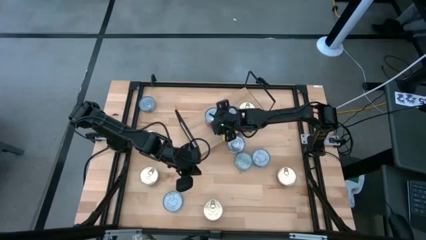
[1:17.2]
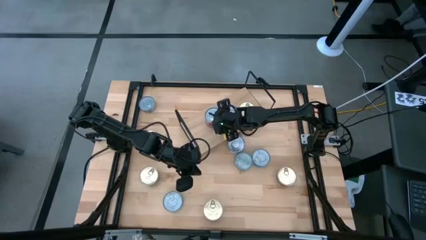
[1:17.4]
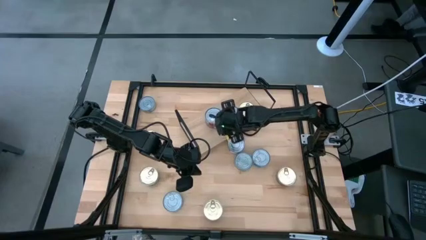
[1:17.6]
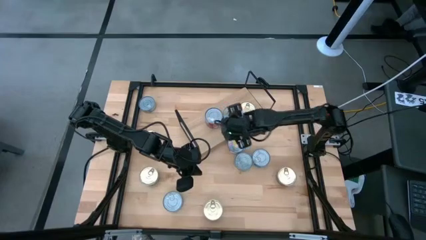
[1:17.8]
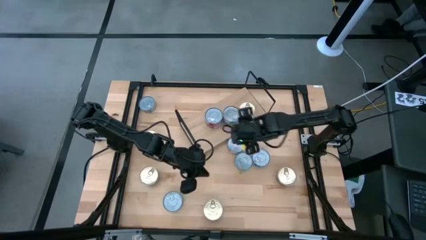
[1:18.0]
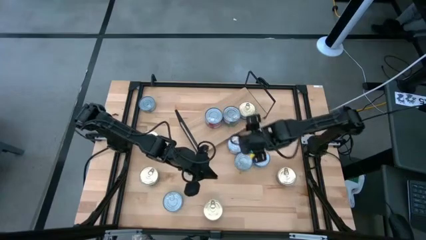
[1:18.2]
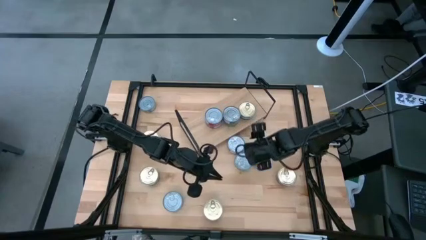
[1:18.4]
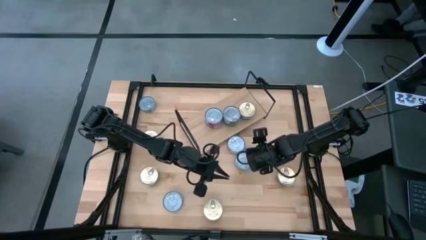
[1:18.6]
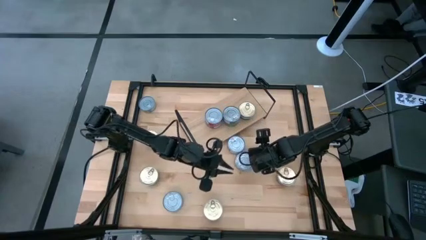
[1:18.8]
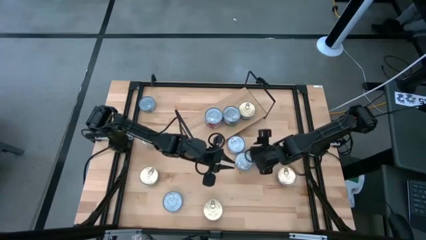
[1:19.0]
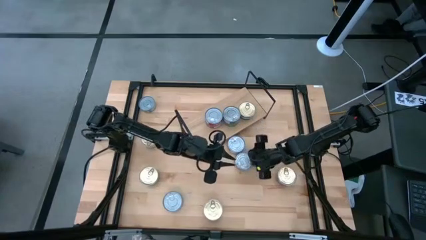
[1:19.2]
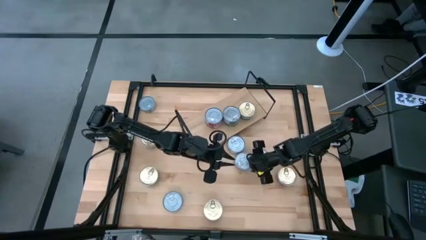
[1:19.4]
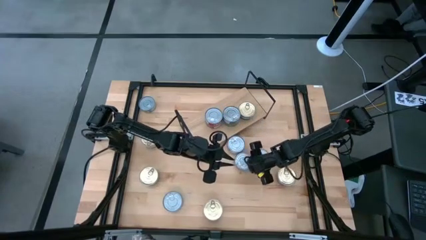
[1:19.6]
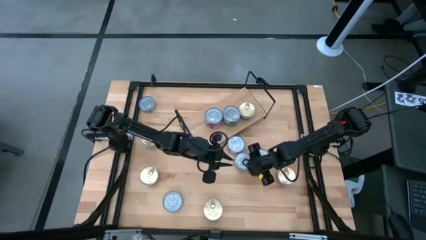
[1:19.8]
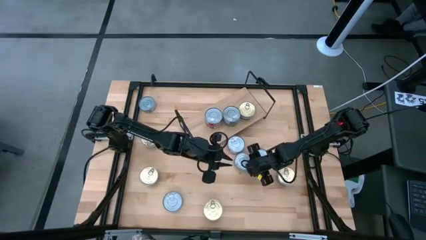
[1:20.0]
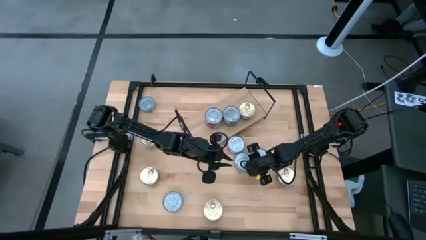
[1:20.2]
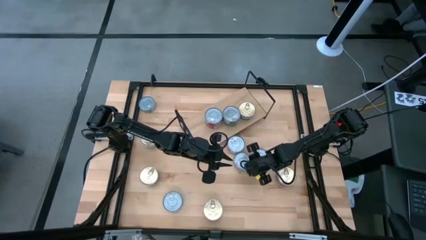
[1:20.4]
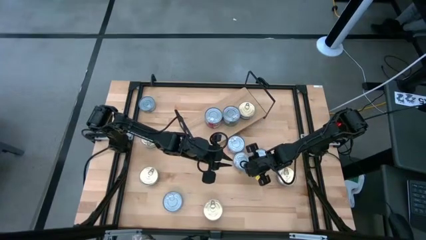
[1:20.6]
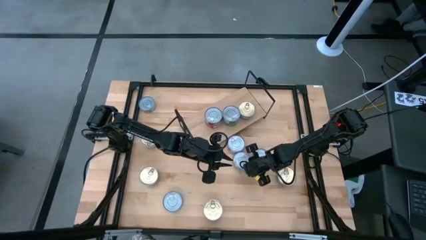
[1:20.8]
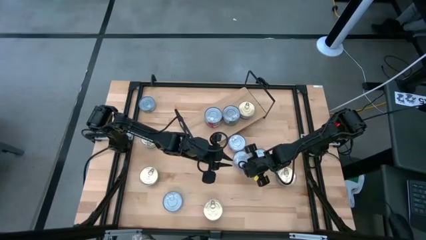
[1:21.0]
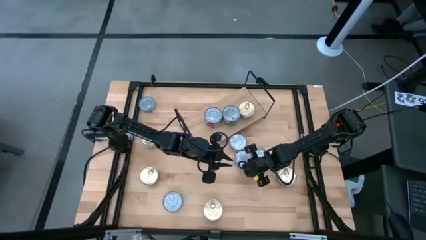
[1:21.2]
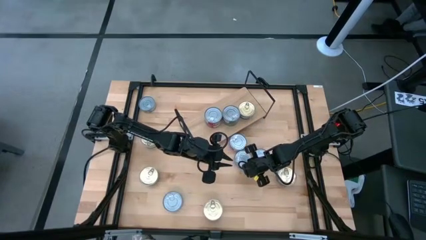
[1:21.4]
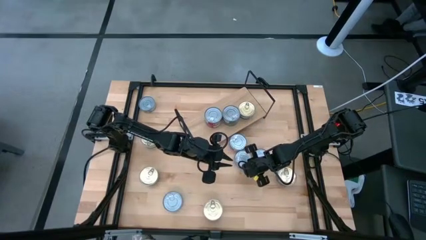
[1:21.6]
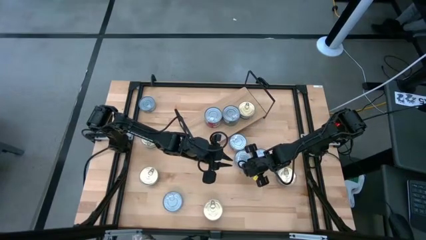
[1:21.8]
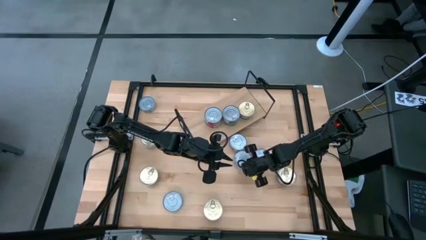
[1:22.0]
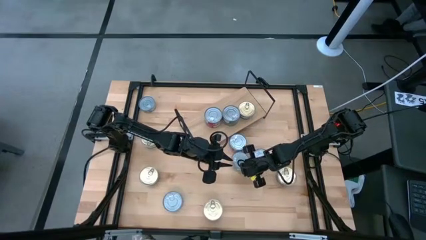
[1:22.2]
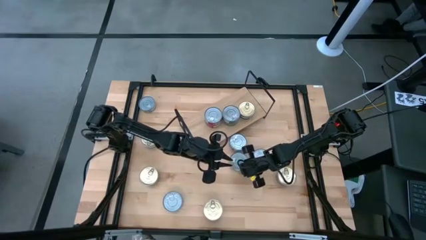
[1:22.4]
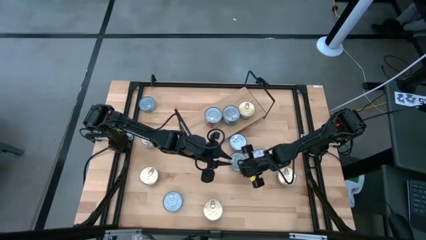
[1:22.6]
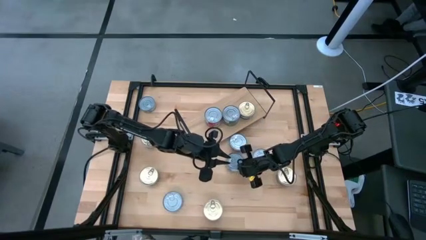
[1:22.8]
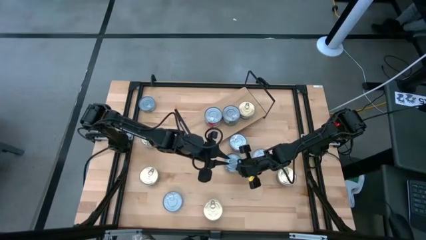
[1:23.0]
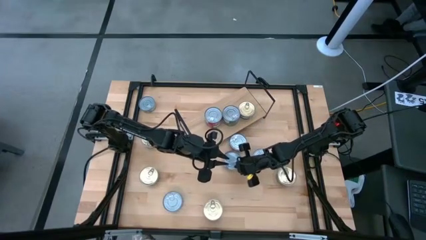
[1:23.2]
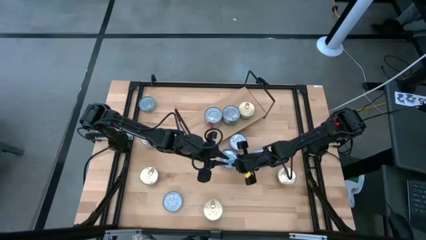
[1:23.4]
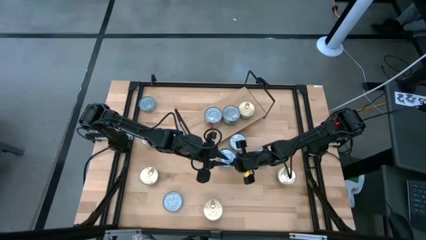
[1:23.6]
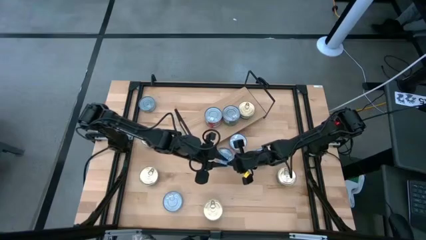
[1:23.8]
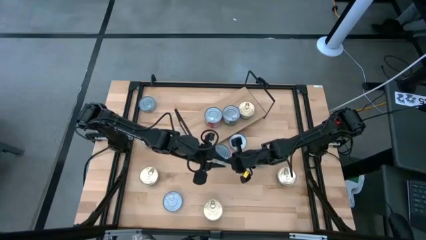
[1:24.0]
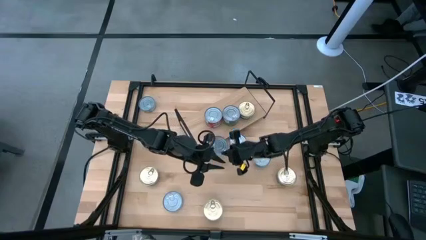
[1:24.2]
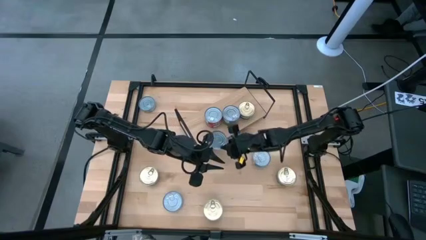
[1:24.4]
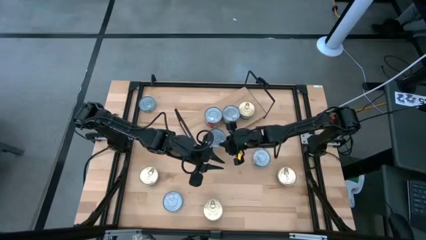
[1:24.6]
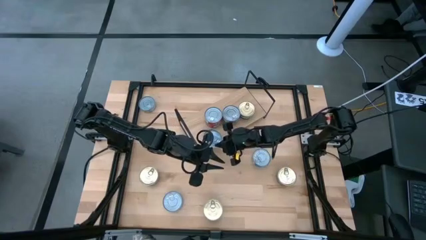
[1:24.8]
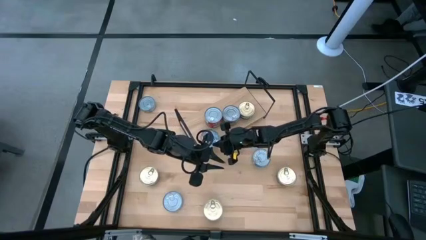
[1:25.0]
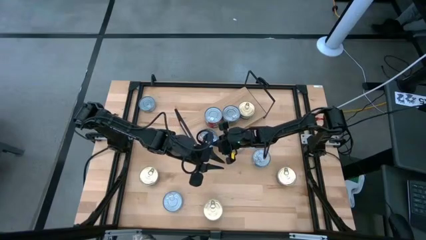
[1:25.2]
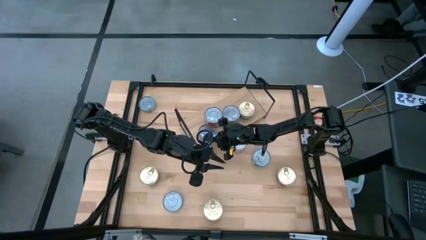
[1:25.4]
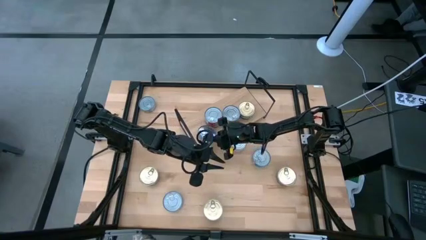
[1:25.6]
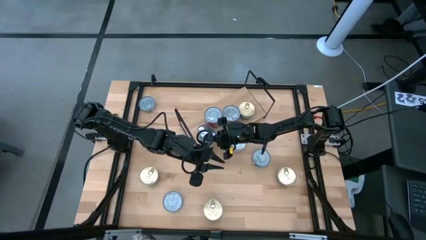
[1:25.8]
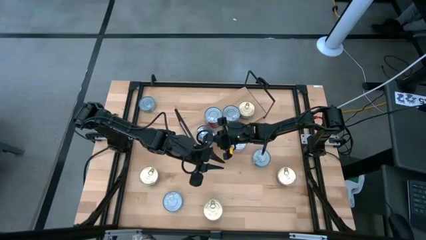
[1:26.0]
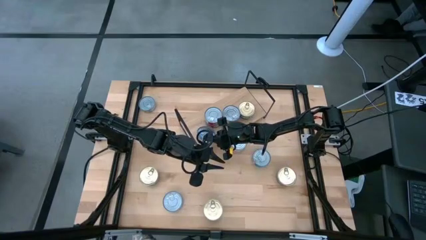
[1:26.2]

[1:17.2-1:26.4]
Task: Stack canned seafood by type on shelf
Put the yellow and blue tuna can on the shelf

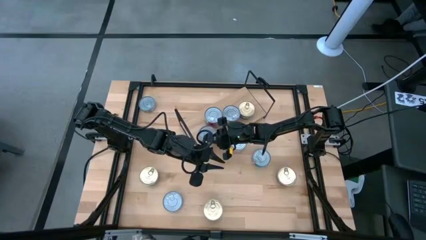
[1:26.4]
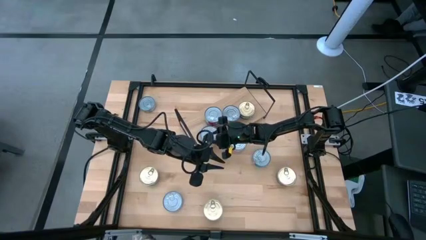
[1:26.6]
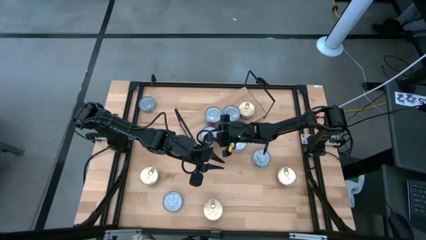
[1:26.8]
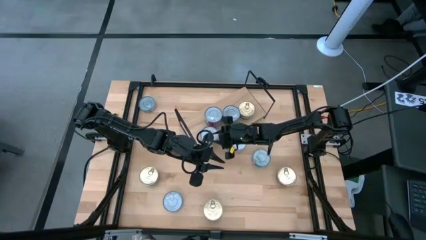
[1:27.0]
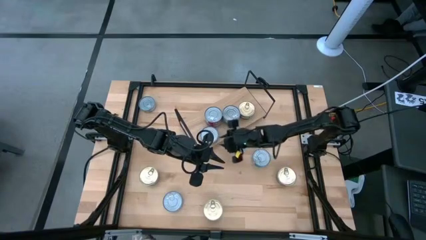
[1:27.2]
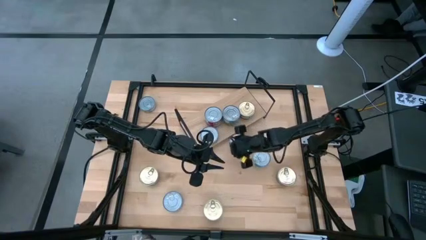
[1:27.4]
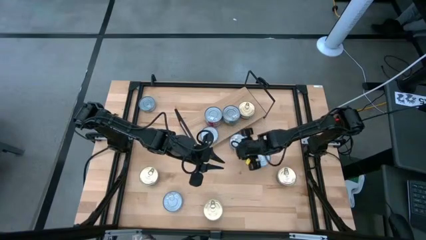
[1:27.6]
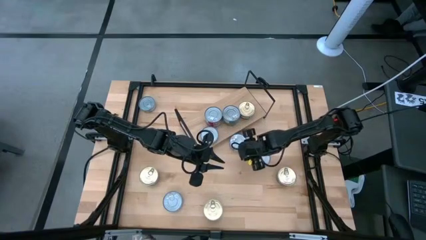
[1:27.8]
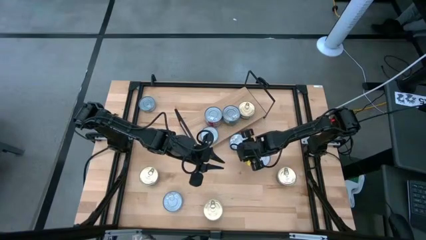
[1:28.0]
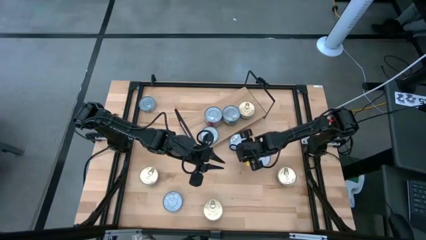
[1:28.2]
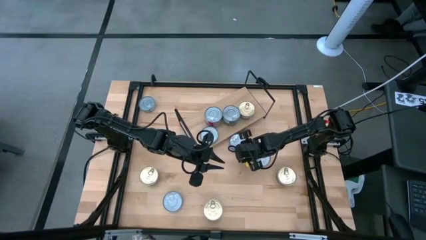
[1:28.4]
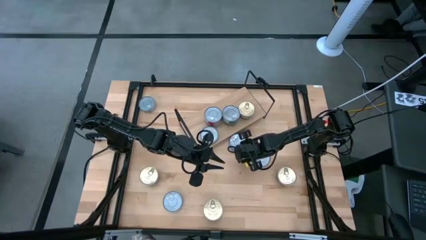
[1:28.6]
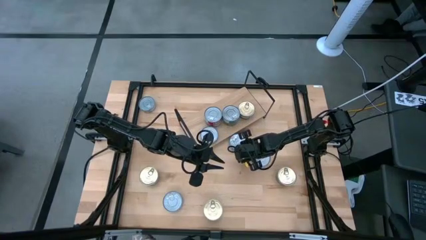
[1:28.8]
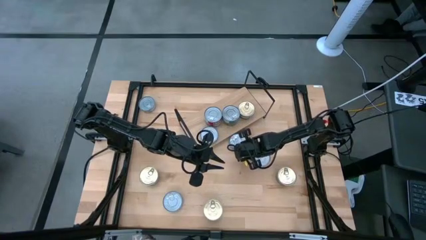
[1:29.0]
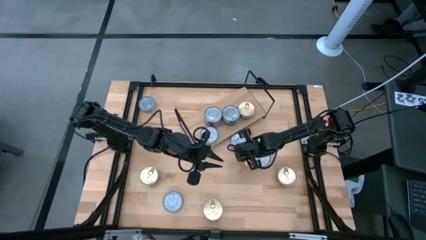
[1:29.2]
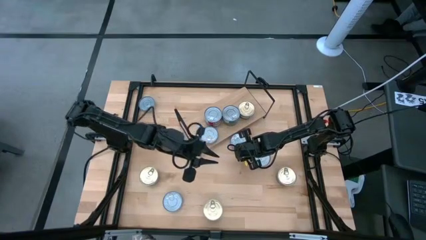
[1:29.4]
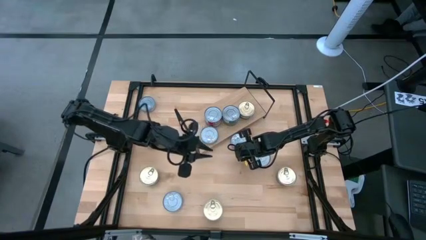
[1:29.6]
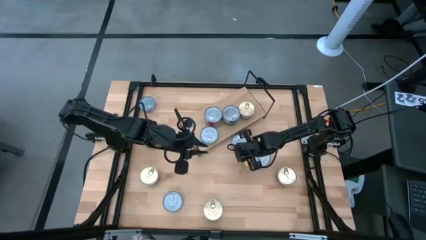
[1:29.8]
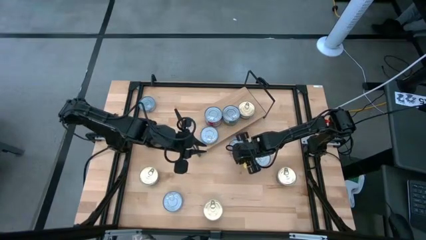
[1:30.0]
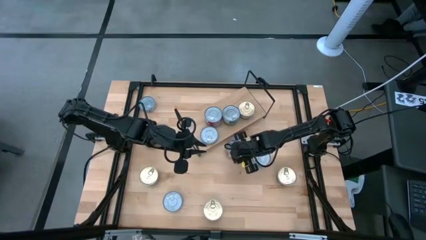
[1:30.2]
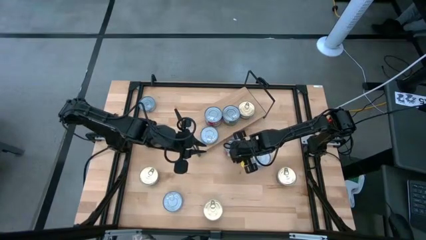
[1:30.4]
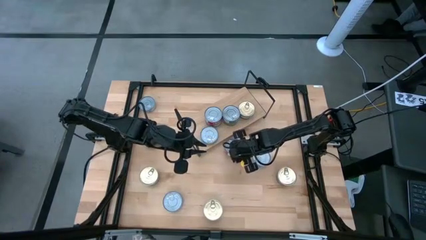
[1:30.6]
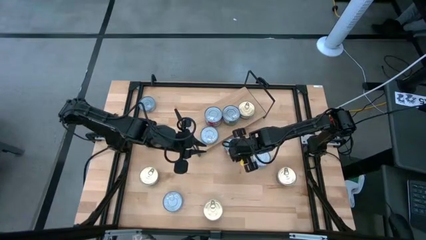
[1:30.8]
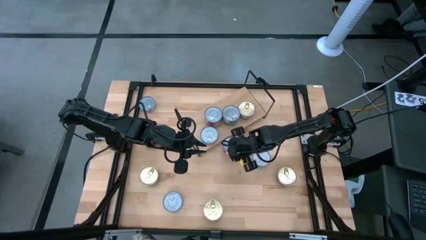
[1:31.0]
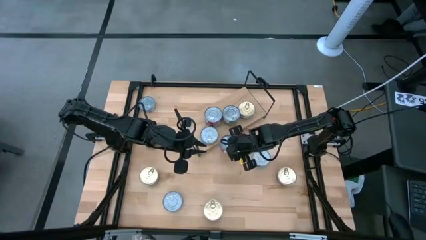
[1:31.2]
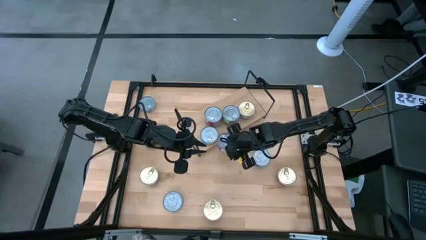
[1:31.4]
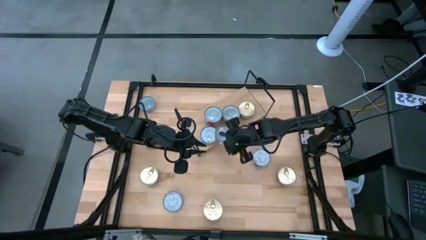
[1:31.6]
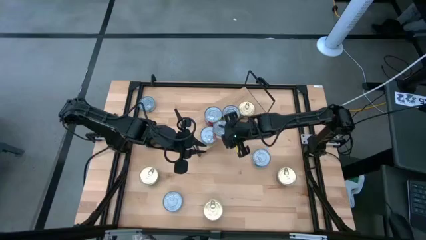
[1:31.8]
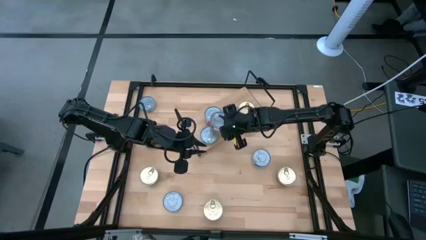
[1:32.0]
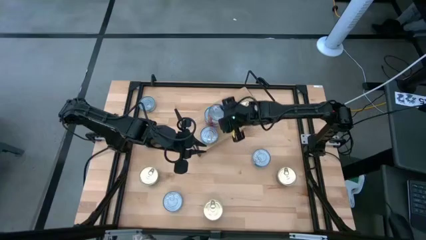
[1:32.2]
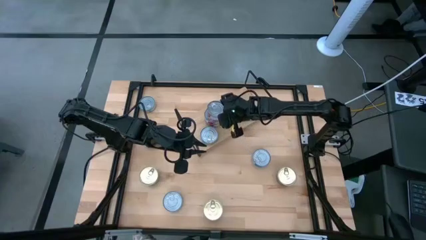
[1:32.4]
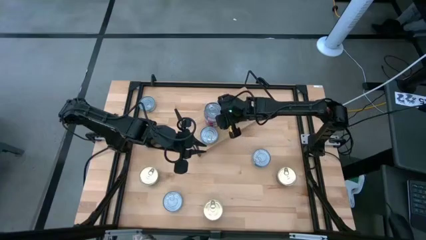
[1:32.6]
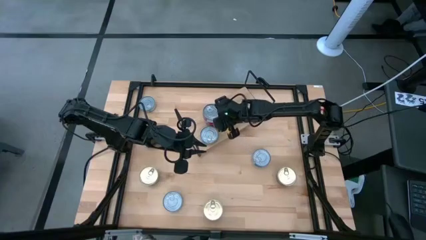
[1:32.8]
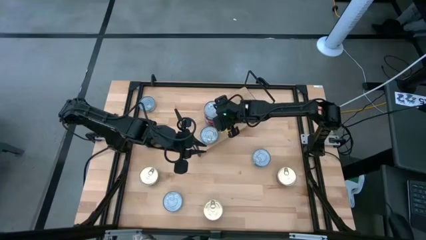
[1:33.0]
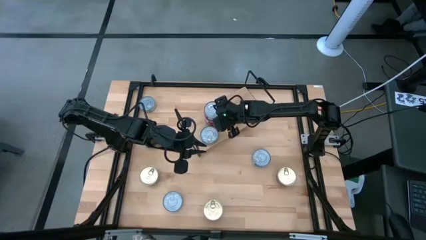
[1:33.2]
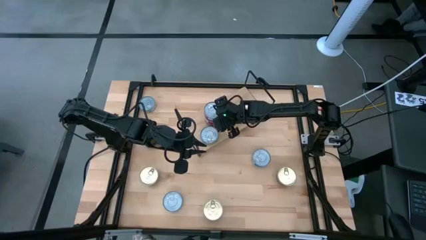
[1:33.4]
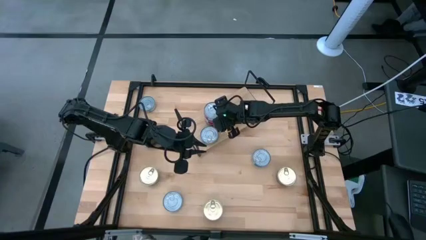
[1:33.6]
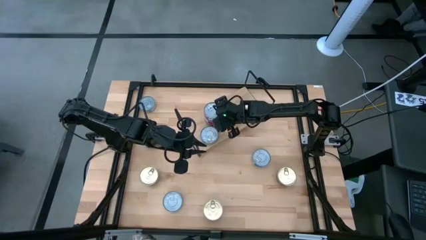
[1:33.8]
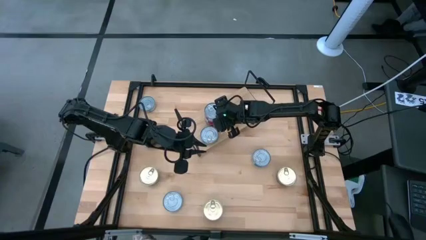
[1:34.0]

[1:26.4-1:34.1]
Stack the red tuna can on the shelf on top of the other red tuna can
